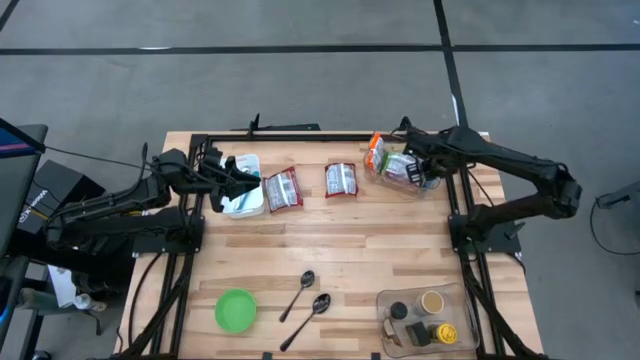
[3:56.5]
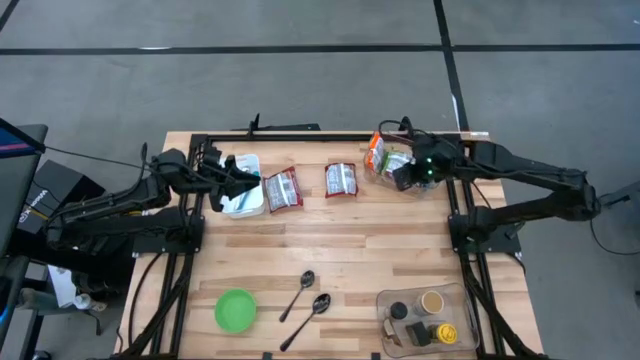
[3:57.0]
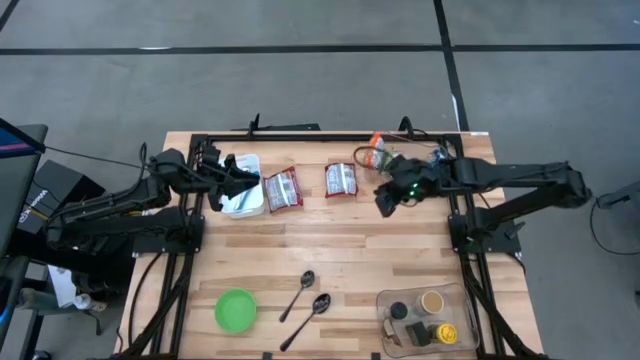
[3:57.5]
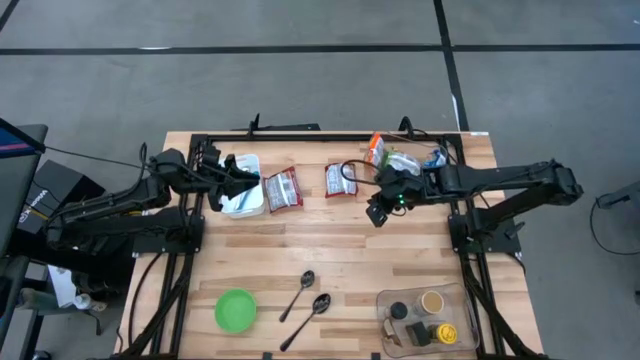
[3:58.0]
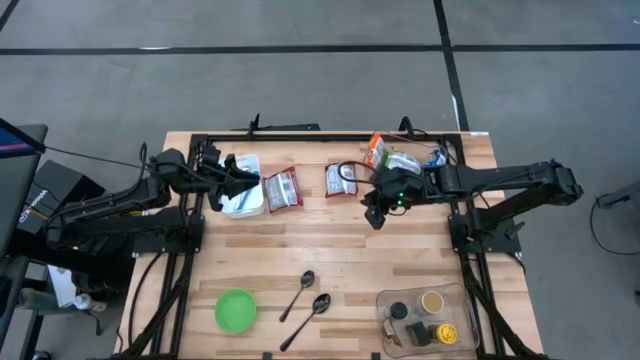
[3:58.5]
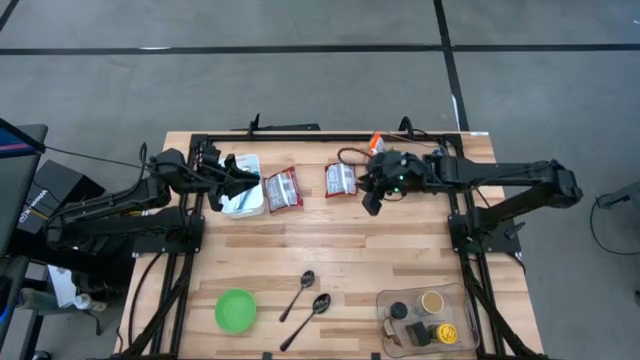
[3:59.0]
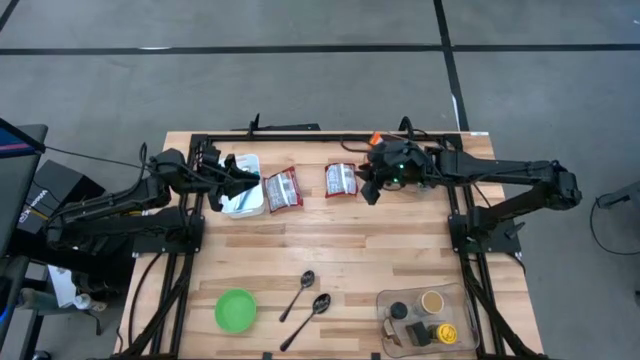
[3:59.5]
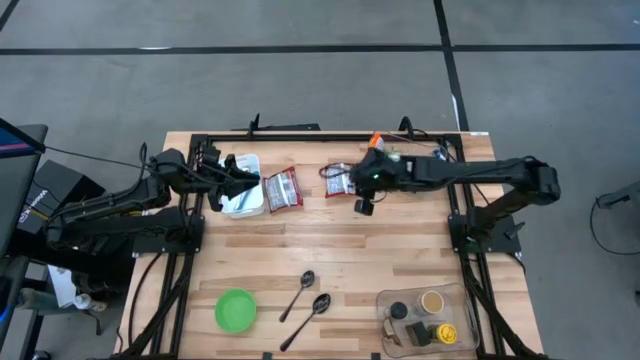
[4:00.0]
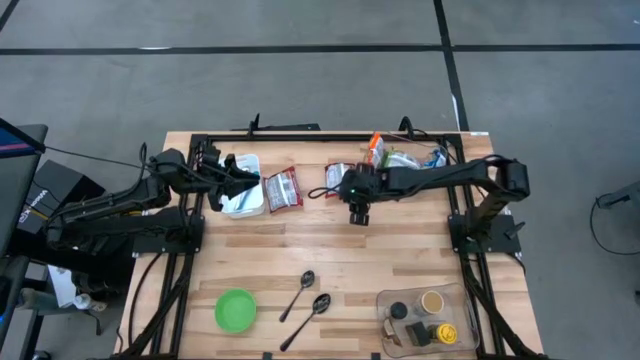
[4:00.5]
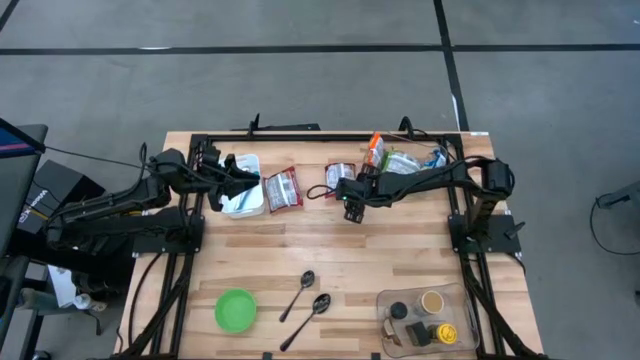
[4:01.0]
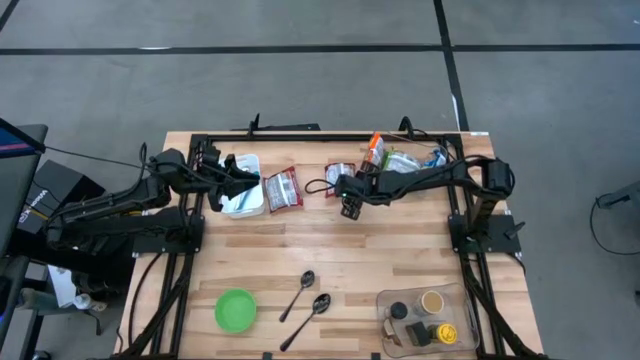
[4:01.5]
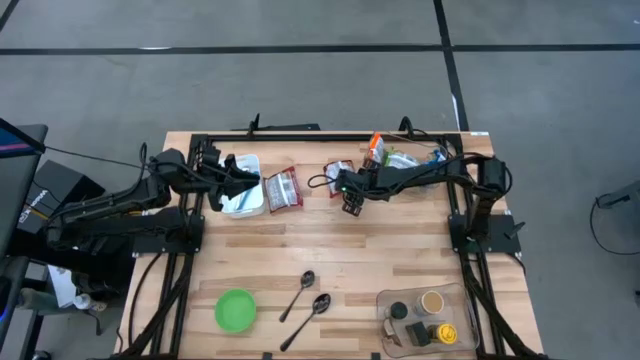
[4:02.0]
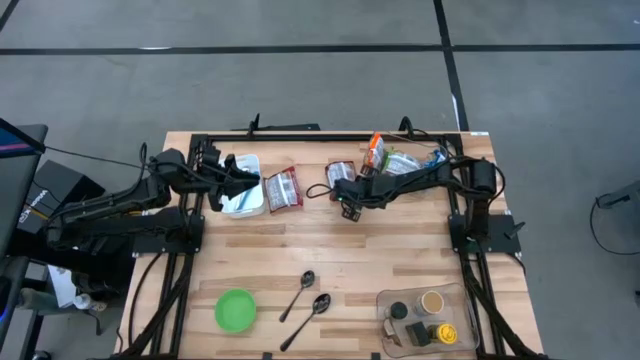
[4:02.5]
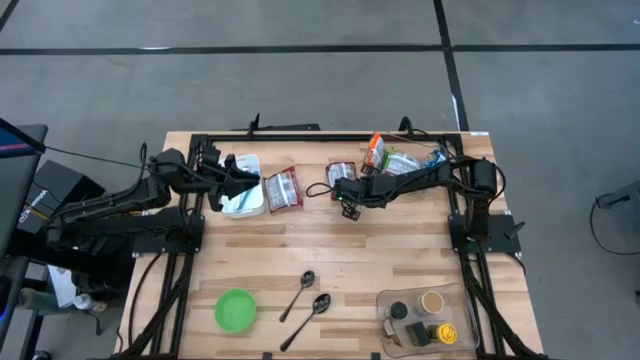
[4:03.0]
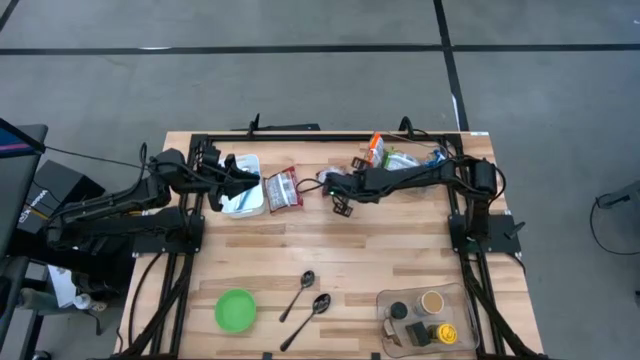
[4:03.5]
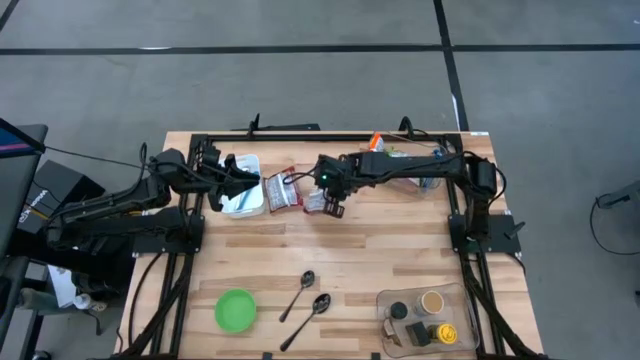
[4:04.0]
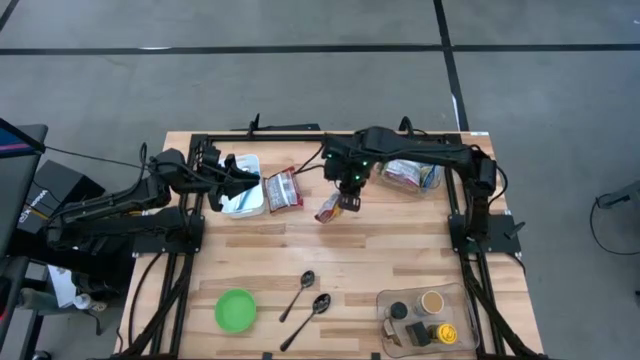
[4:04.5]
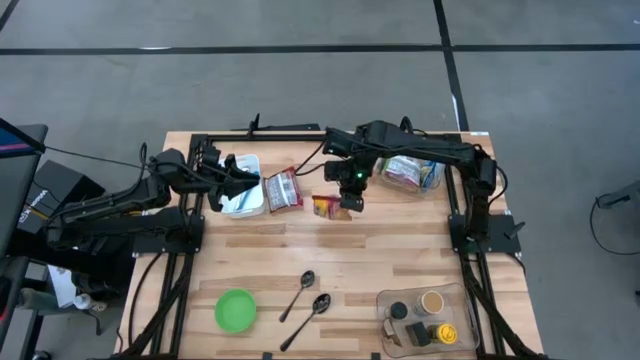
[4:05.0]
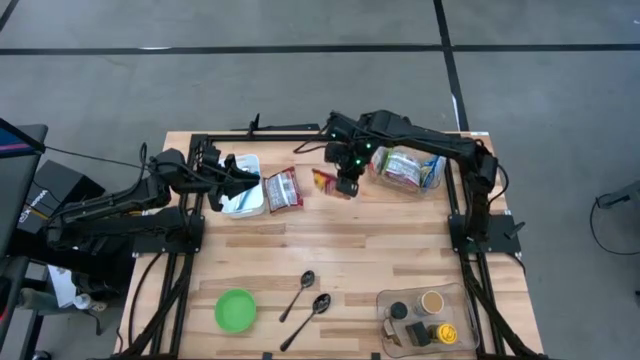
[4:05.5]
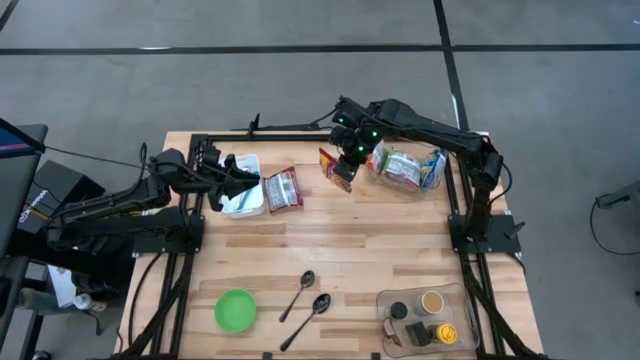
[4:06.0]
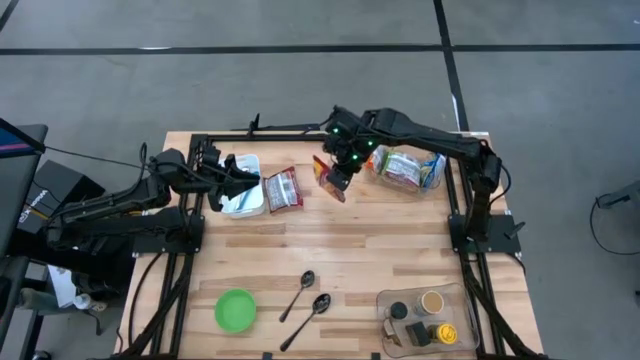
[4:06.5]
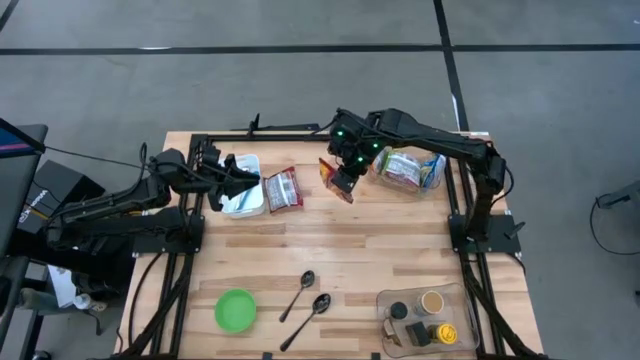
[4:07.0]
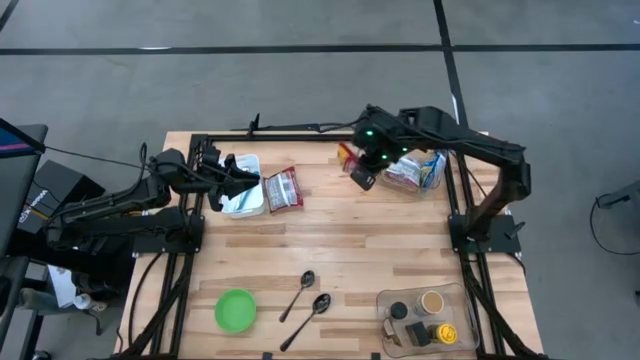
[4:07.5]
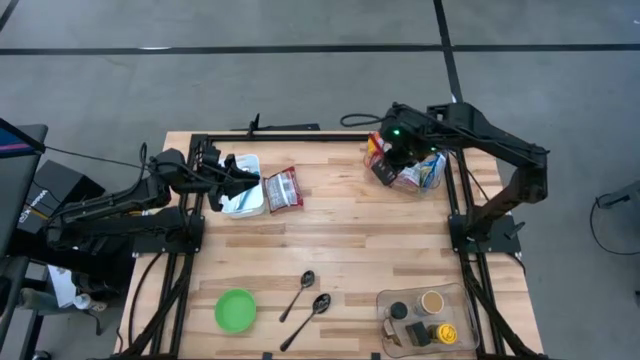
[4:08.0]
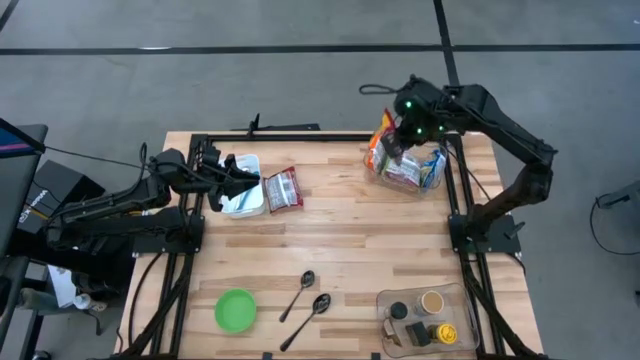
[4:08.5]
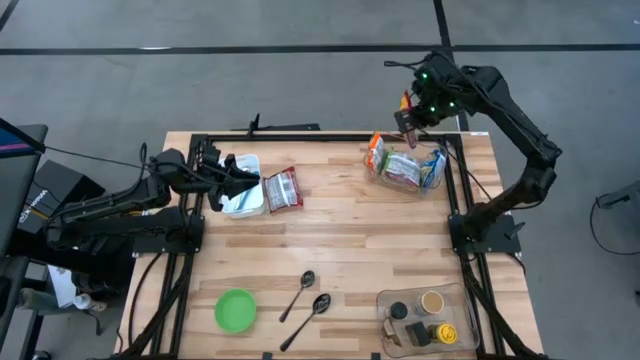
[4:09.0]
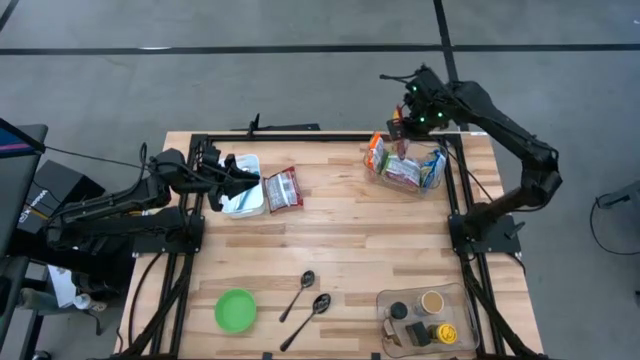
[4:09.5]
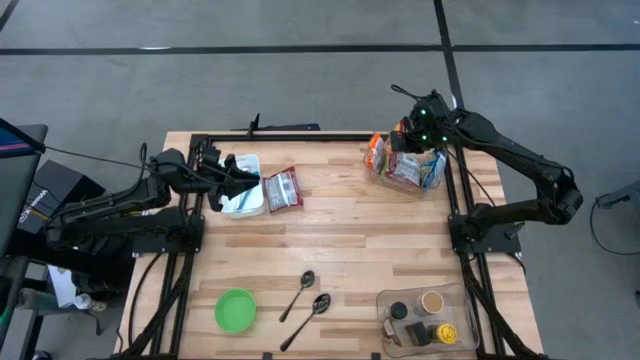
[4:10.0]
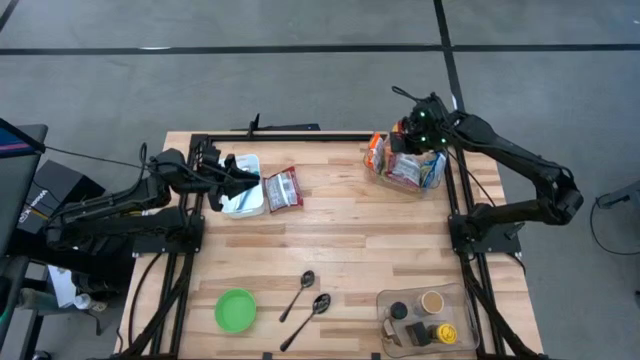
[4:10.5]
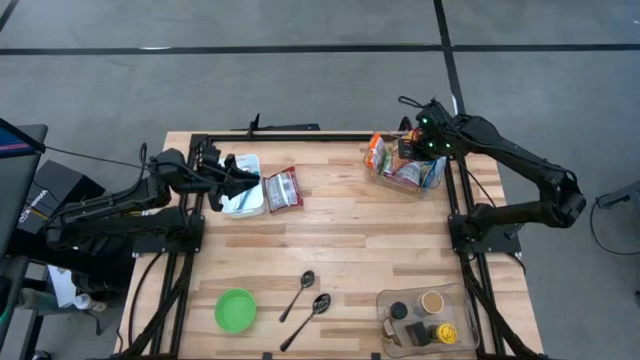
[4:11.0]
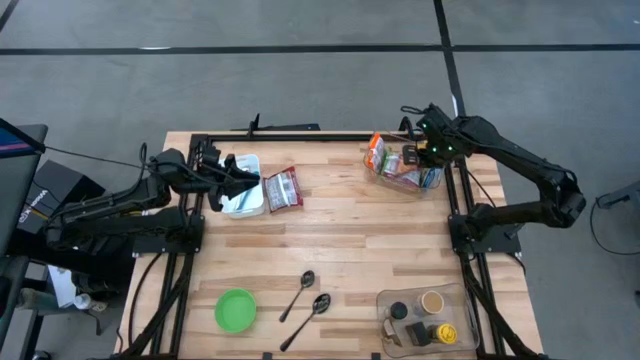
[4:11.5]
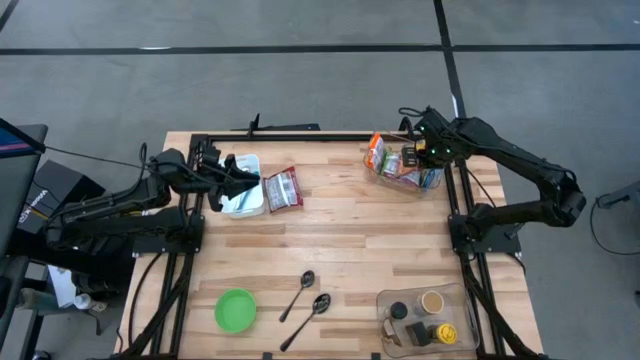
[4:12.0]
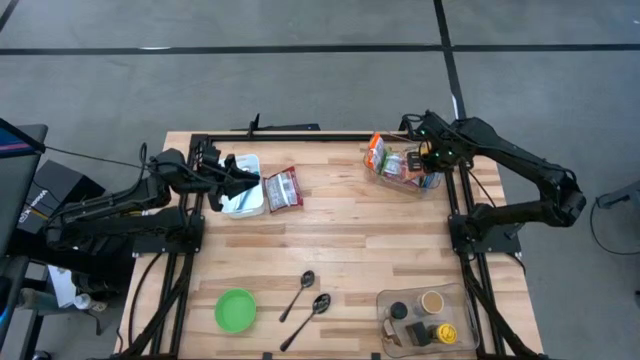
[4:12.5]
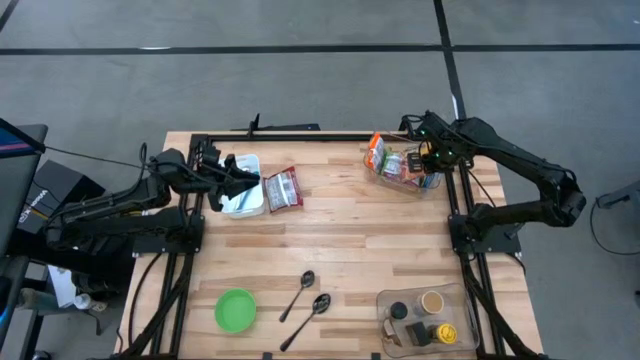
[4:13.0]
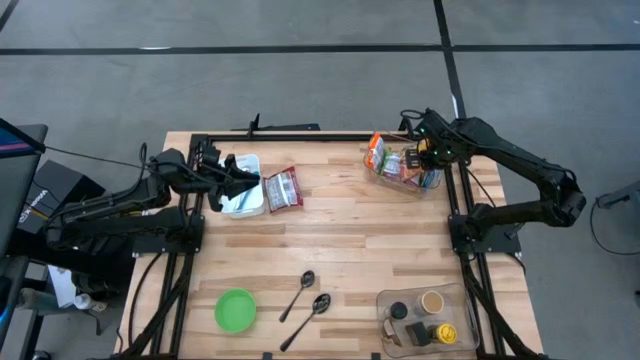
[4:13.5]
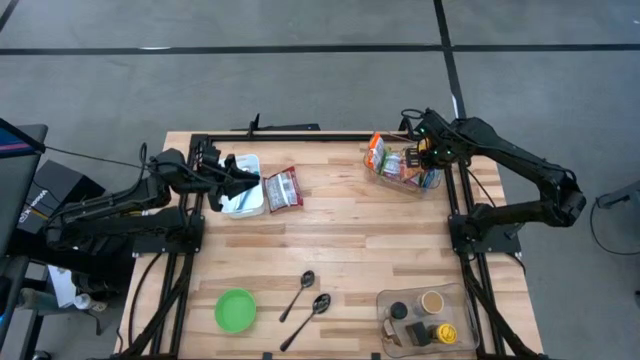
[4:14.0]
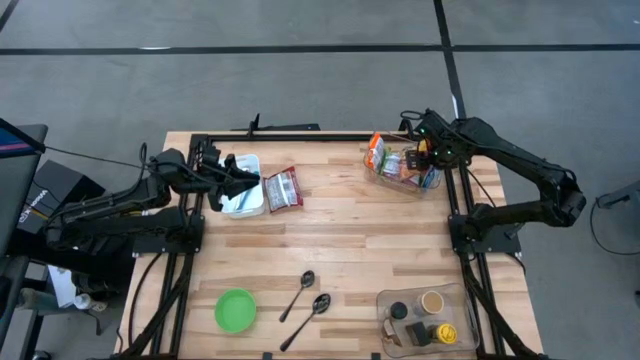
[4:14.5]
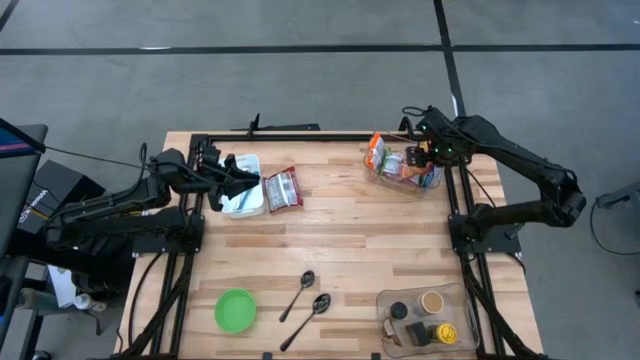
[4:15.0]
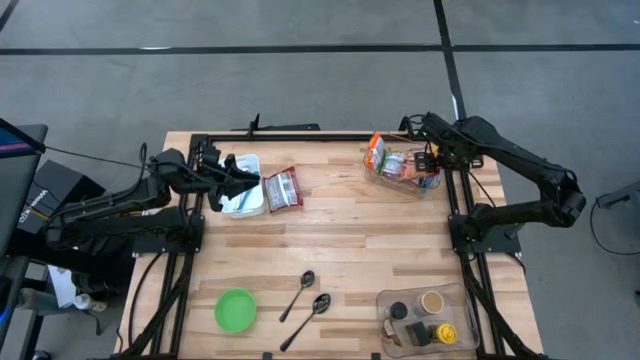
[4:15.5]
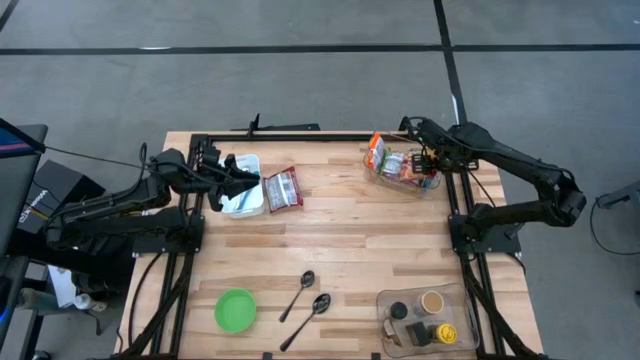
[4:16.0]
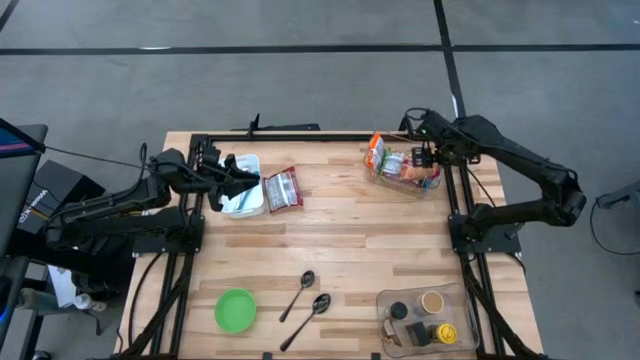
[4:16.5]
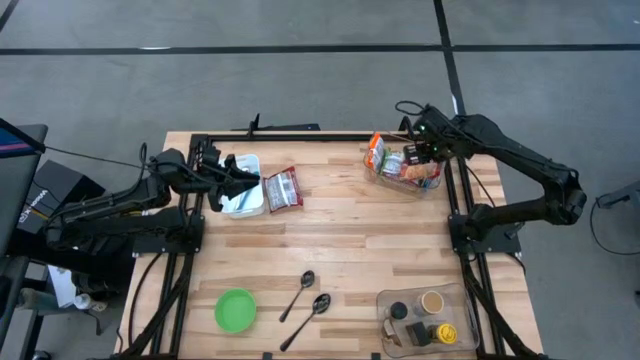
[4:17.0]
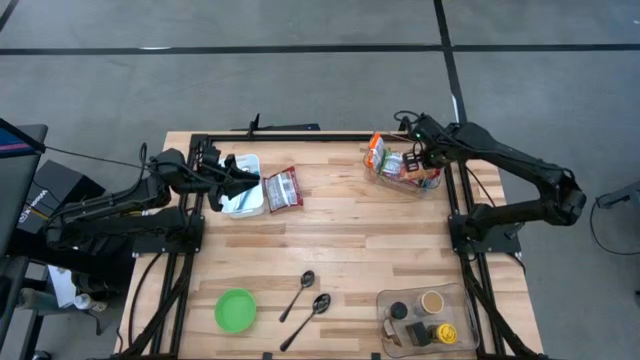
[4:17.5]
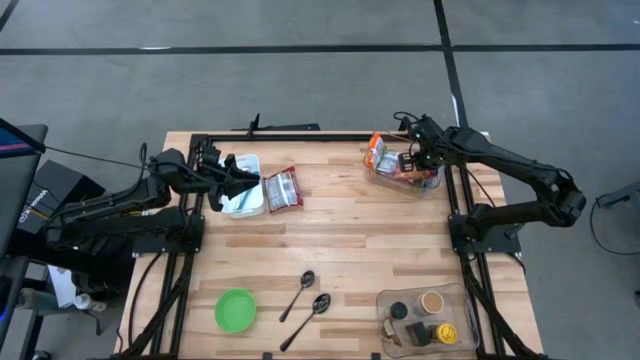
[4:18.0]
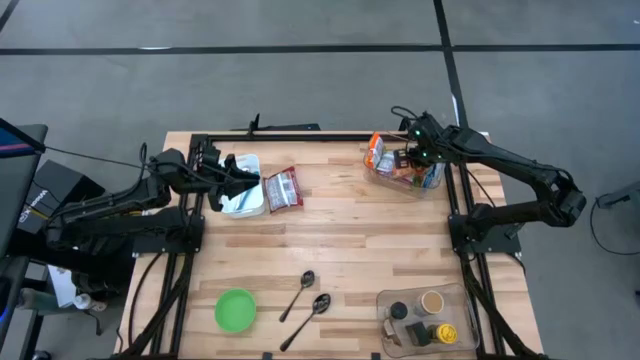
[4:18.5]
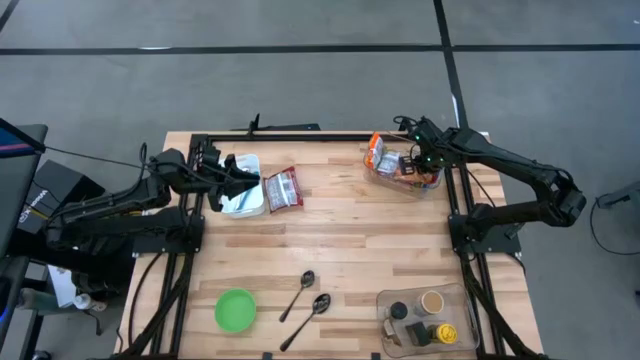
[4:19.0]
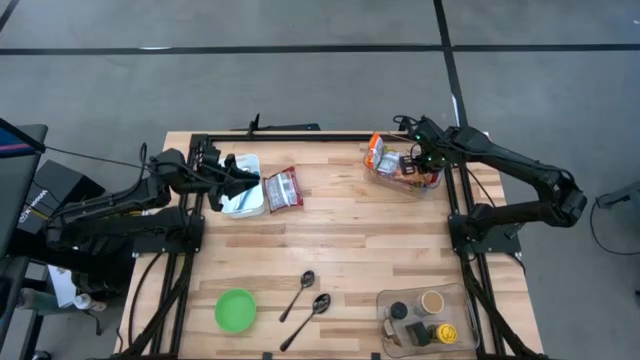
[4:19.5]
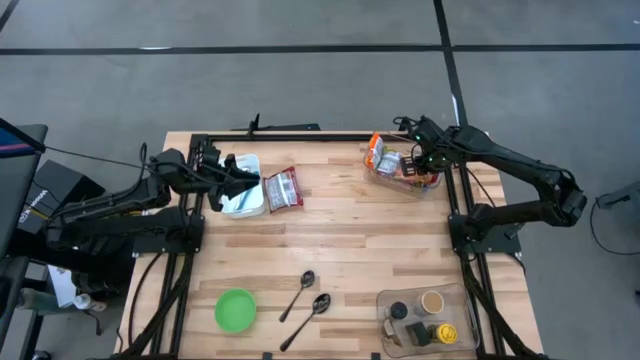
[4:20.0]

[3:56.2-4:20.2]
Task: Pick & Place Food Item
Put the right red noodle pack into the top transparent bin
